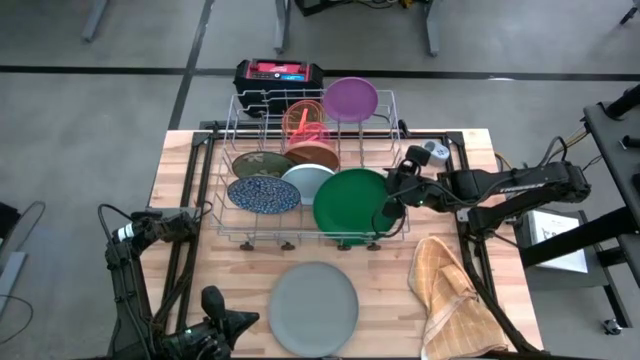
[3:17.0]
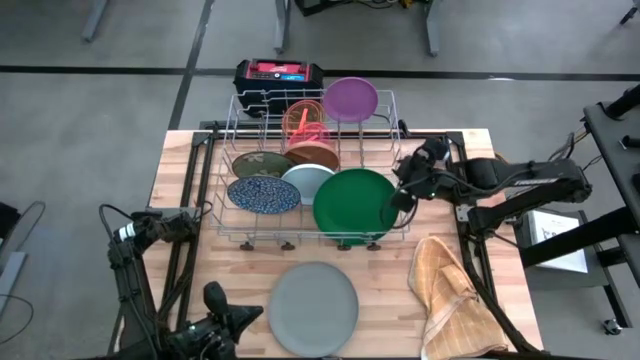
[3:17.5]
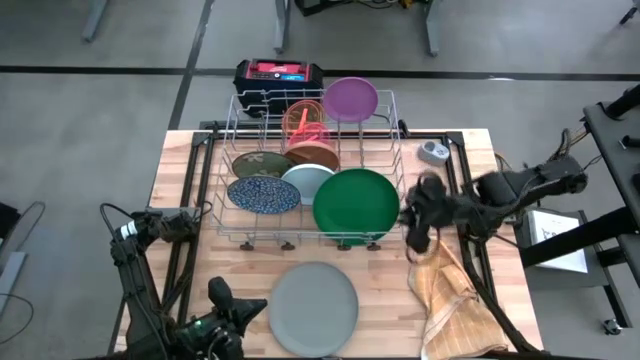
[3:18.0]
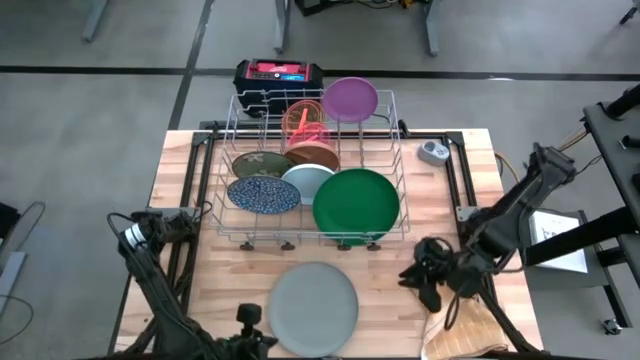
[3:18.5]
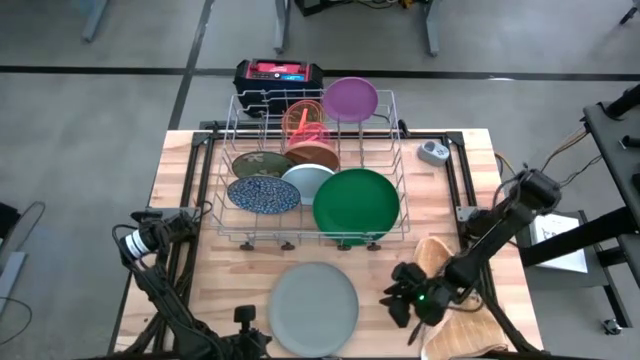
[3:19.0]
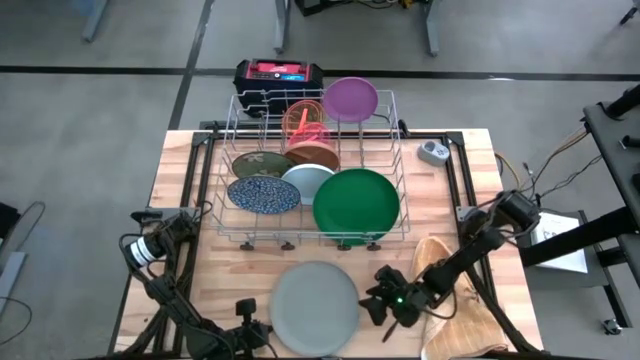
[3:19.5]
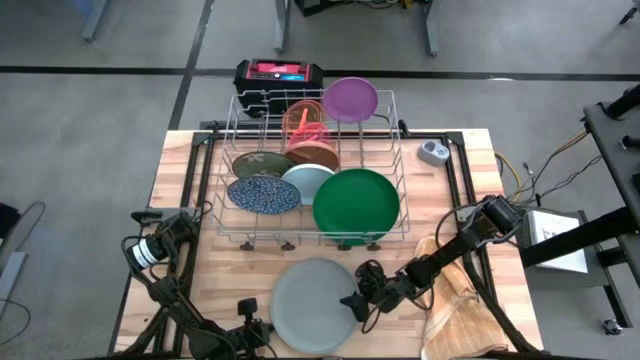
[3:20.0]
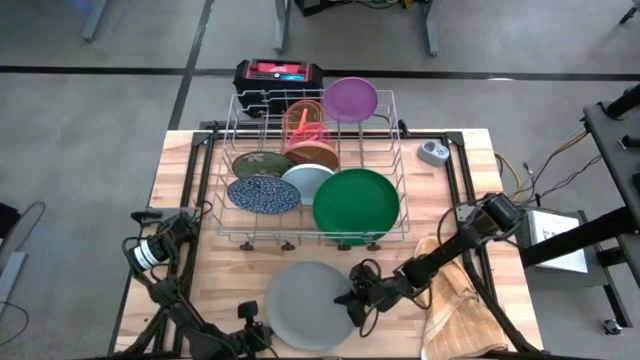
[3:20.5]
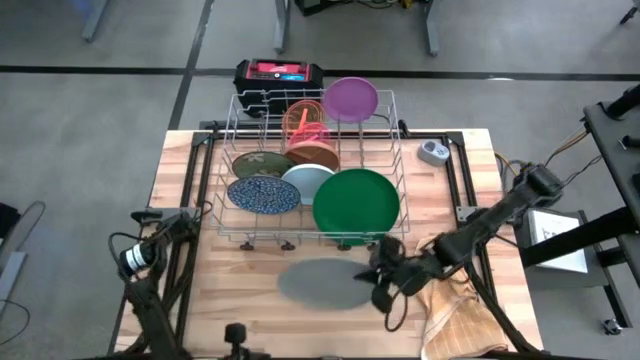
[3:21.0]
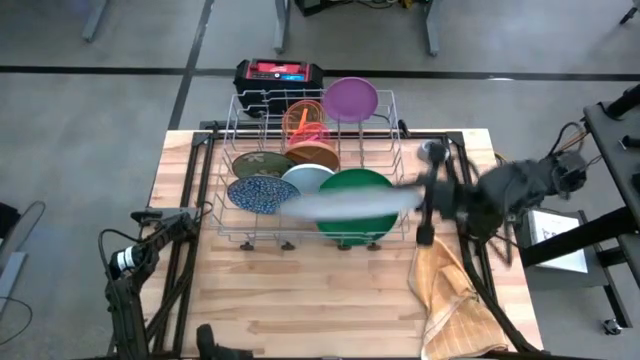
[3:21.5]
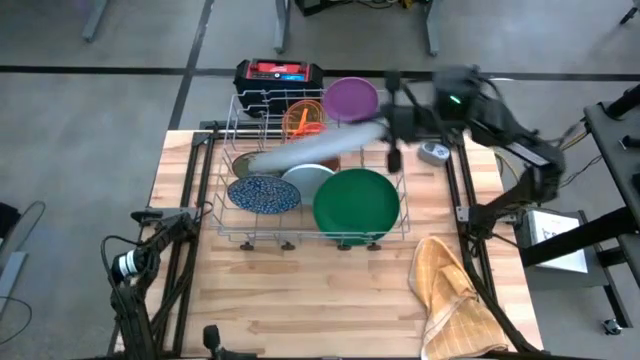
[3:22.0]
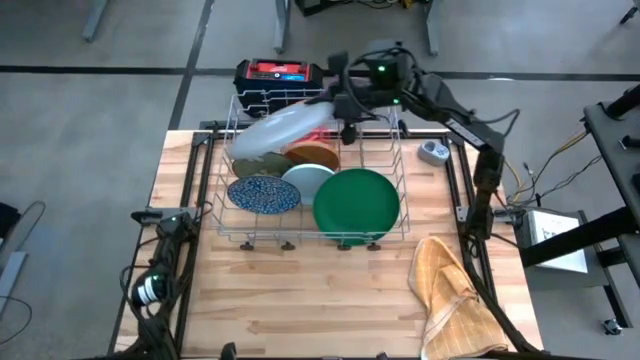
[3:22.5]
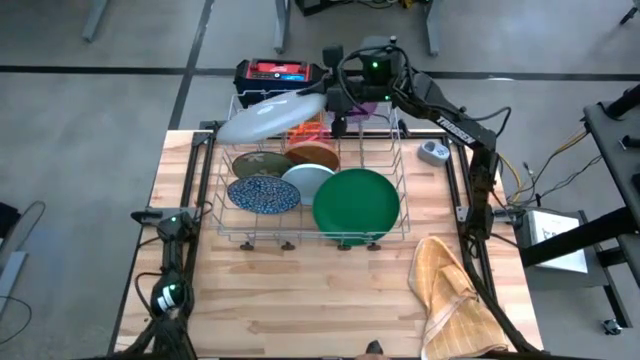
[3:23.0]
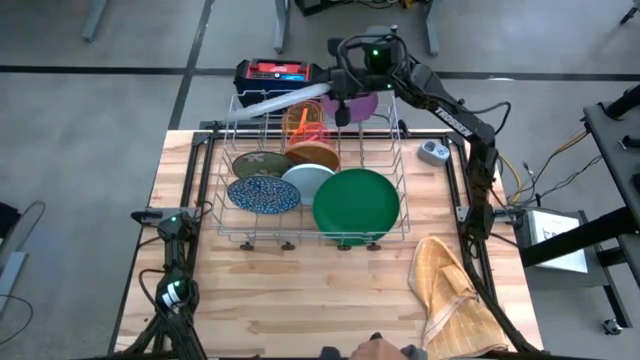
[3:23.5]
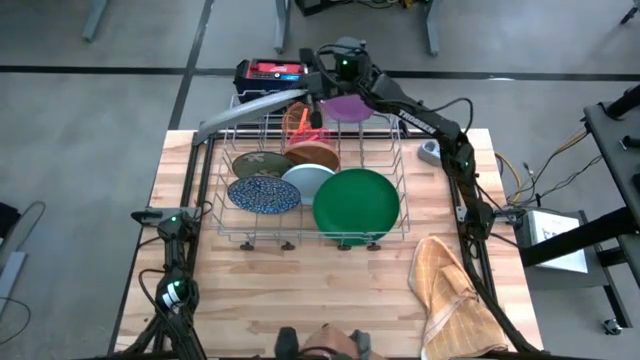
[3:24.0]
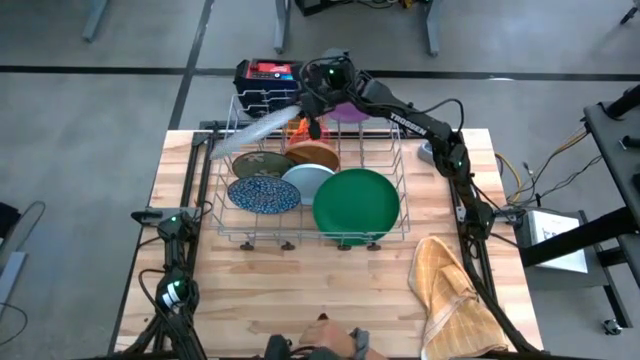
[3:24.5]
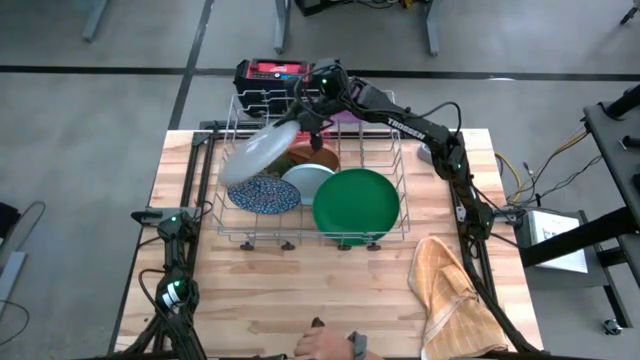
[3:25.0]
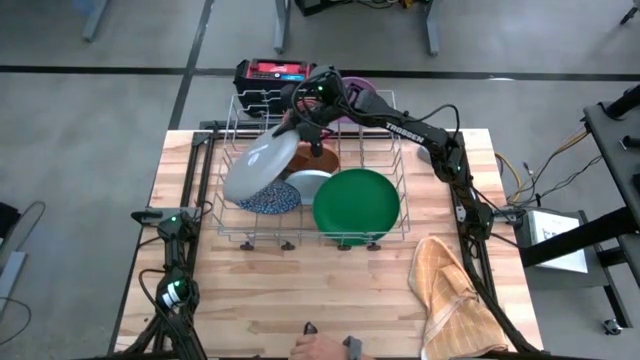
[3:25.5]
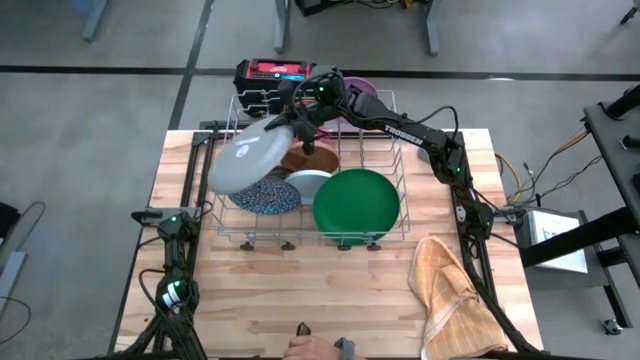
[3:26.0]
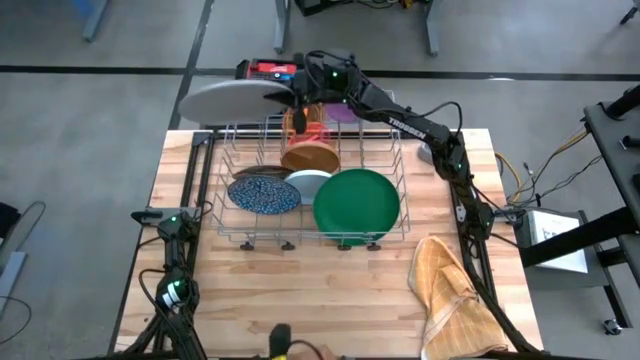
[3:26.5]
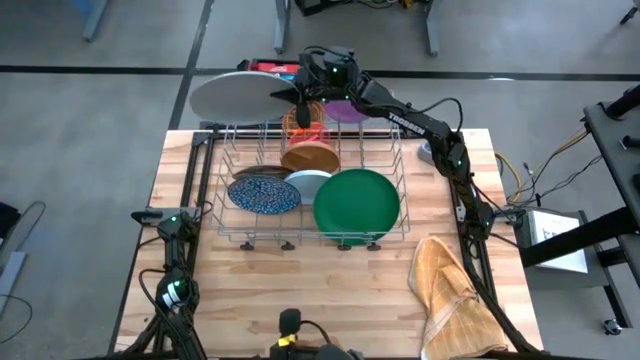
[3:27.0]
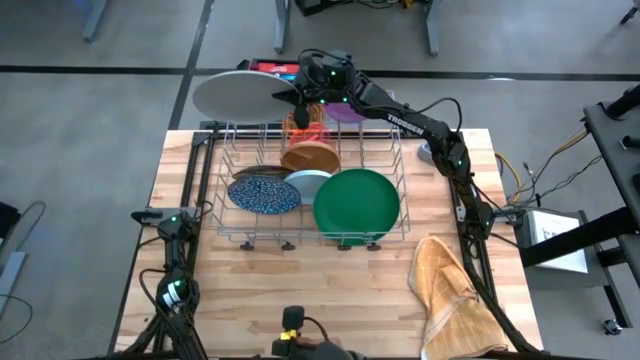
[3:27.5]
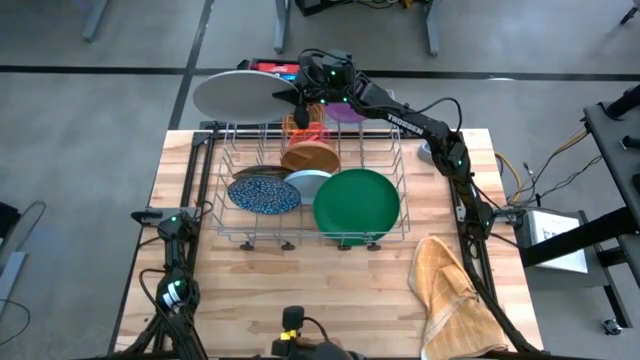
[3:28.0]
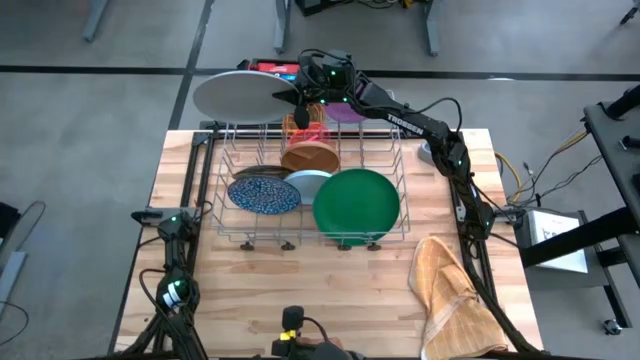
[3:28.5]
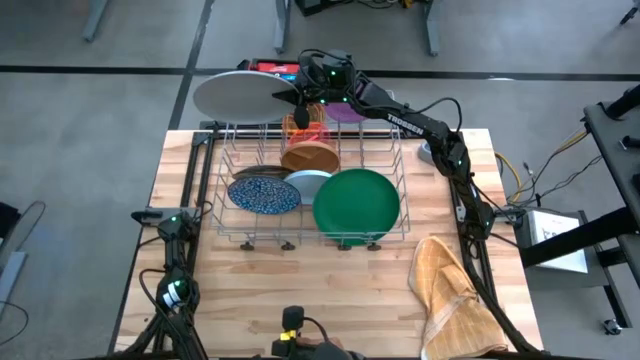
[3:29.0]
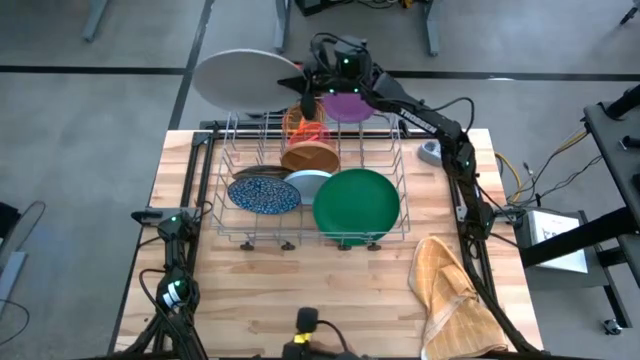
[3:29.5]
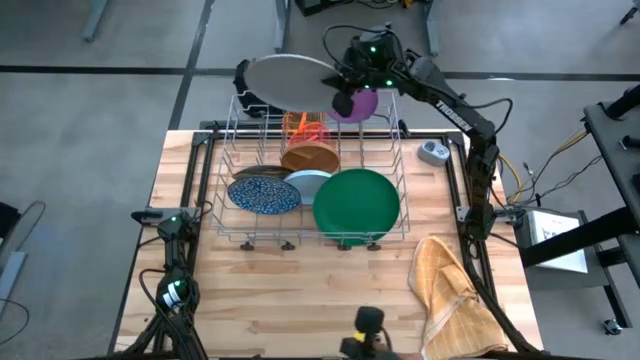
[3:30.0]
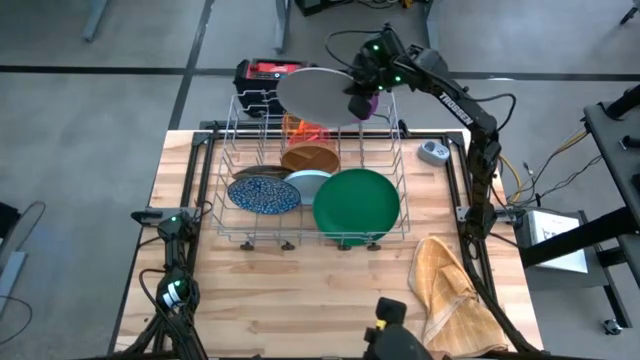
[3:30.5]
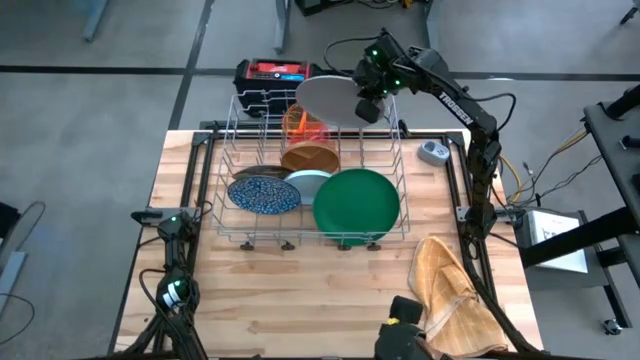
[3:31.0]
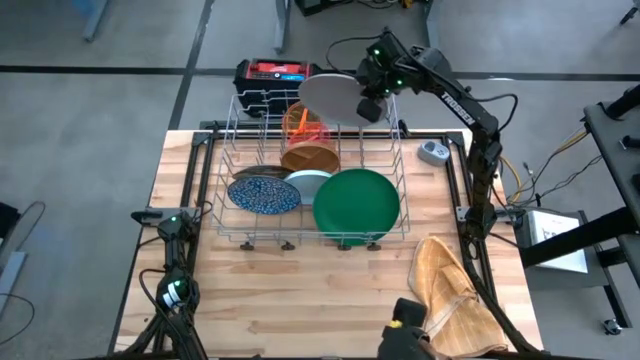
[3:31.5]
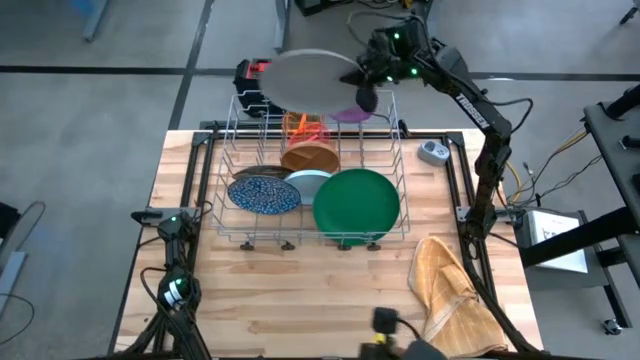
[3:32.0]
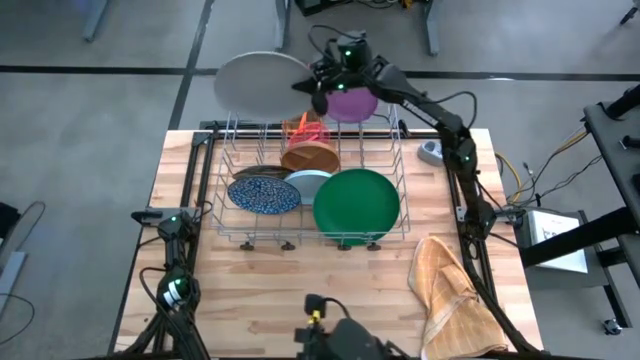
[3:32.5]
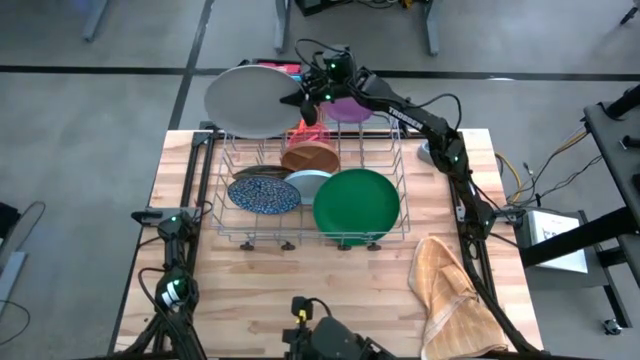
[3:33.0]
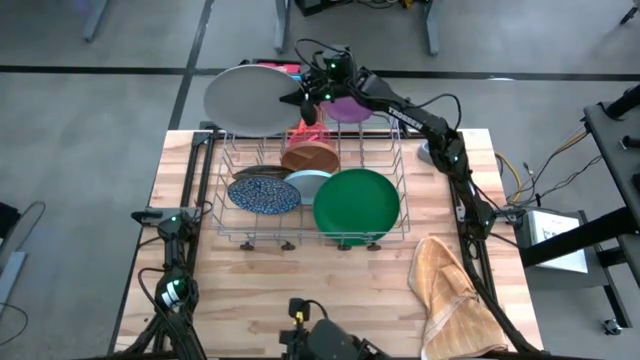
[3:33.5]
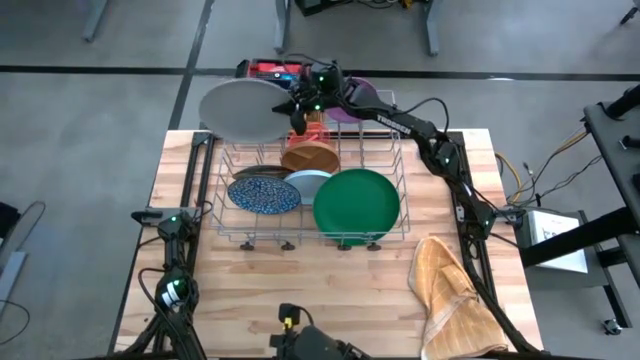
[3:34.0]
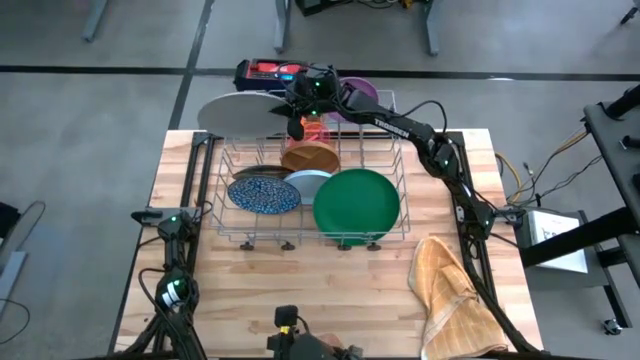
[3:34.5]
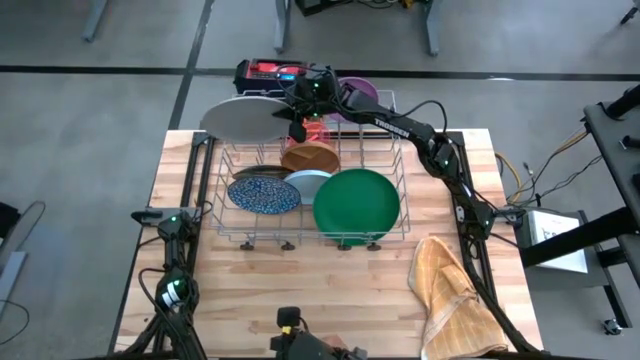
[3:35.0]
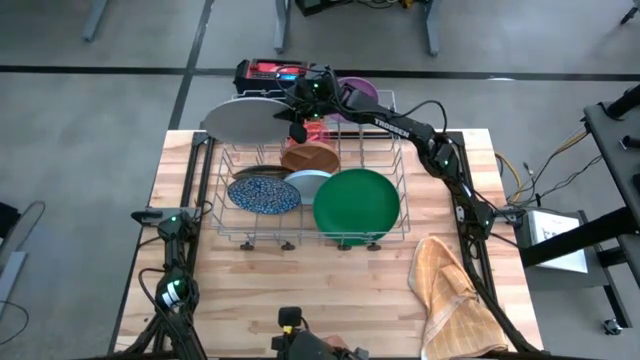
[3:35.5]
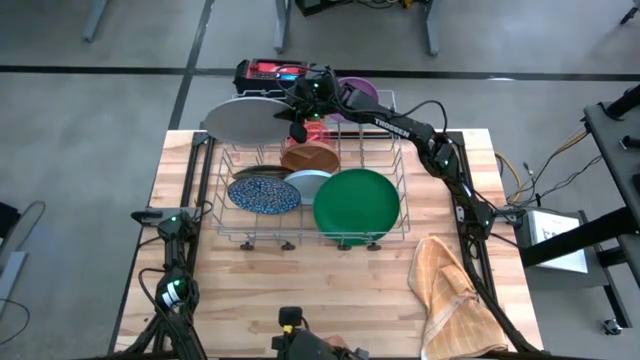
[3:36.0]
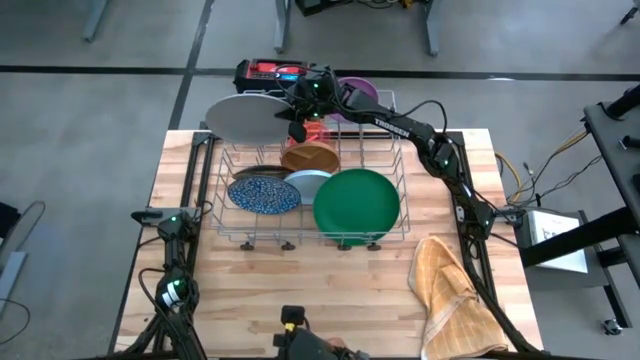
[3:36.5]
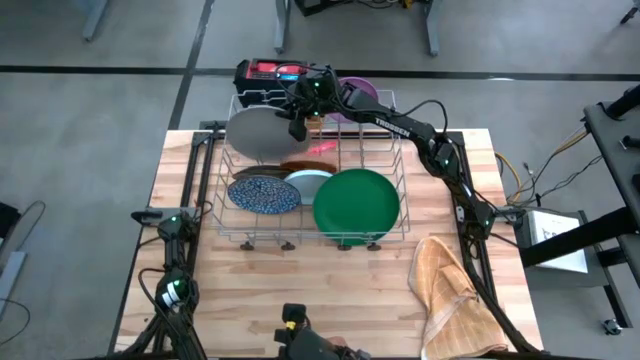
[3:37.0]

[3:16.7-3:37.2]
Task: Sort dishes
Put the gray plate into the dish rack
